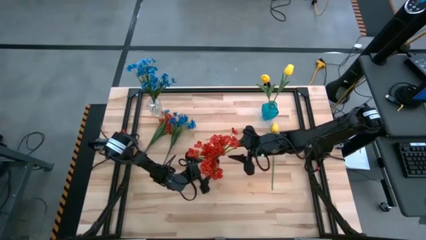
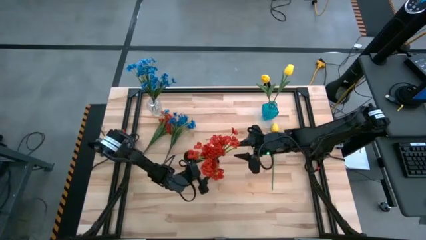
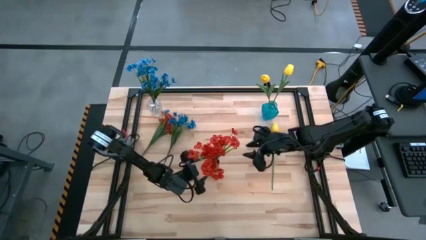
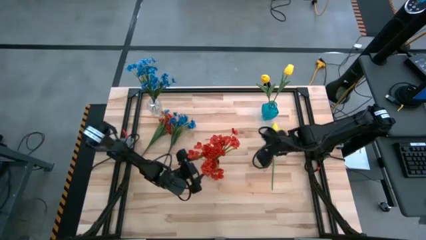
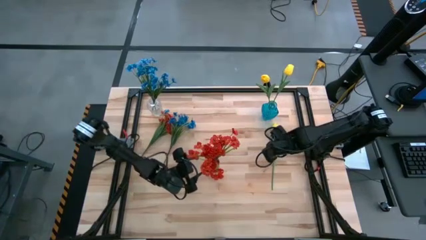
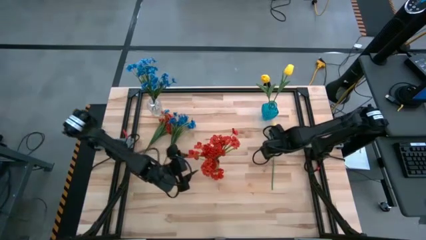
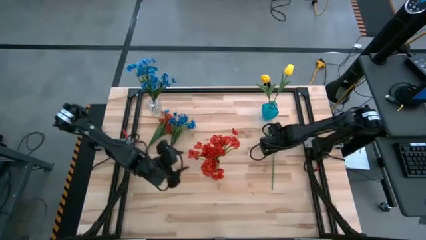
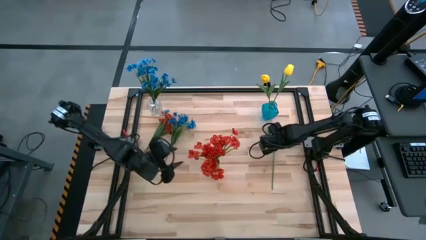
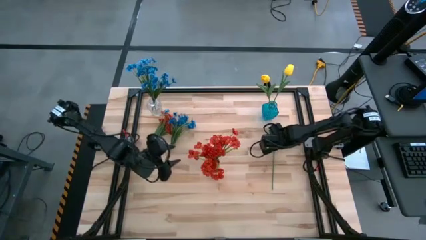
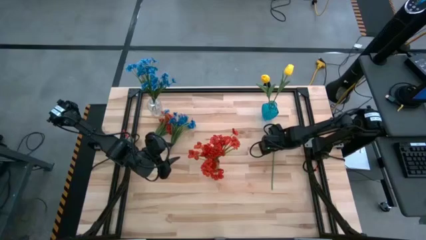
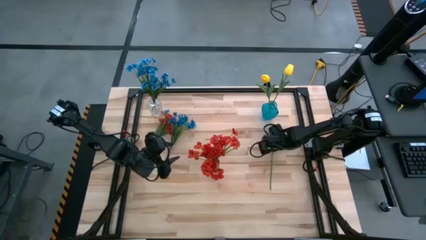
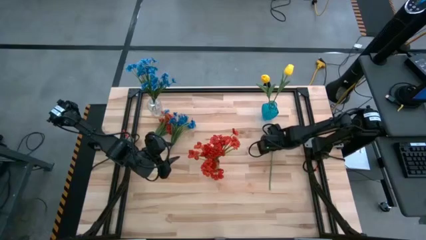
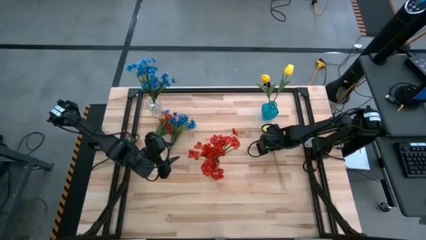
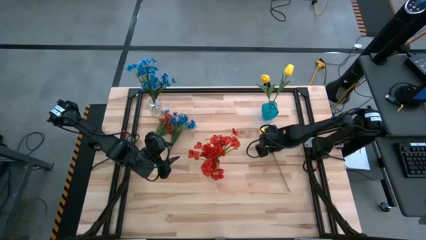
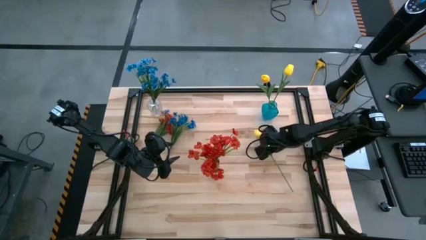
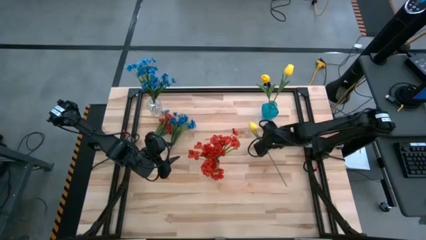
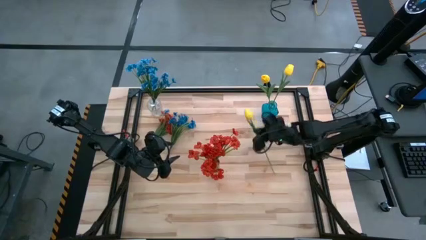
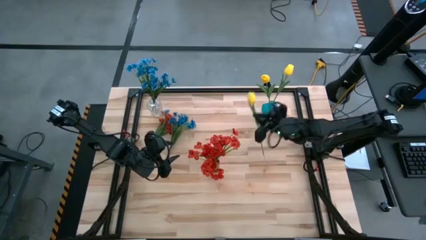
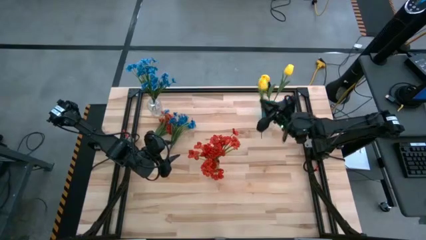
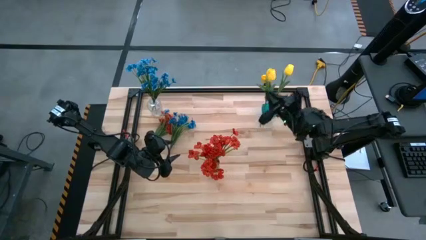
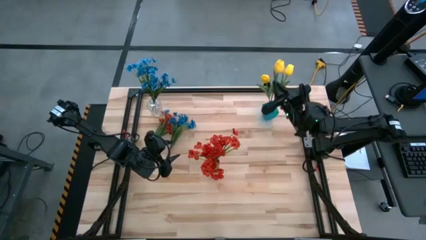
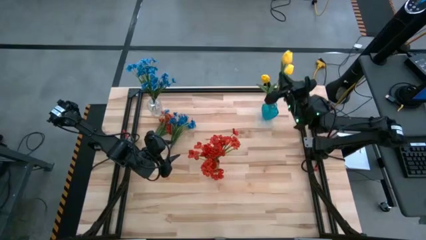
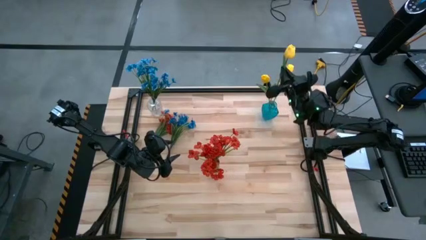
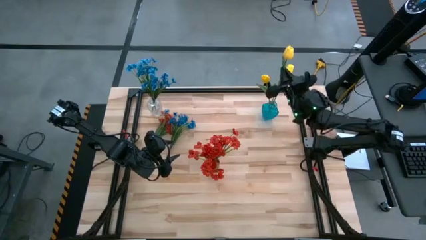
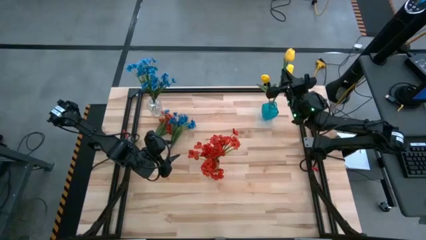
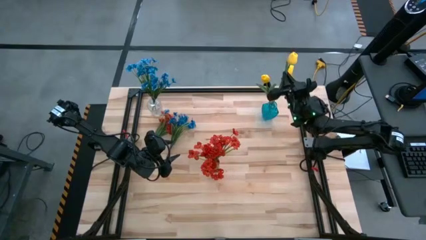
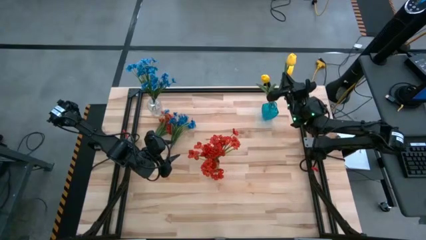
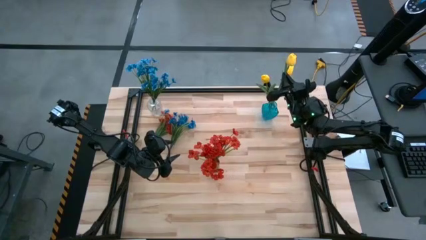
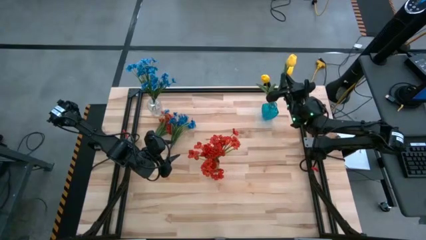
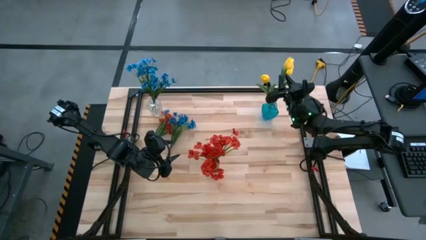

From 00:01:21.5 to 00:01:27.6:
Task: Sort flowers into vase by color
Put the yellow tulip into the blue vase

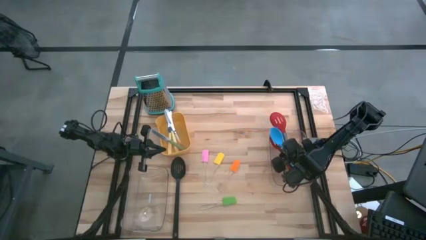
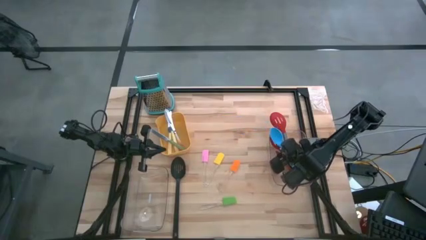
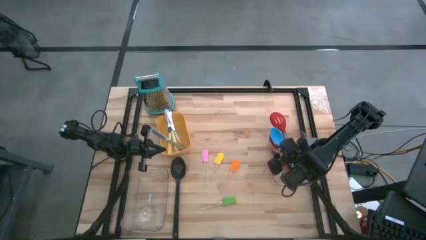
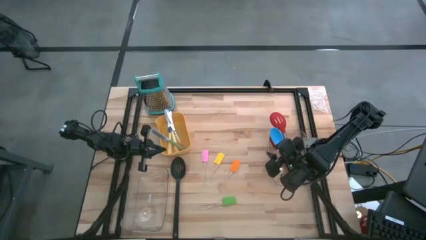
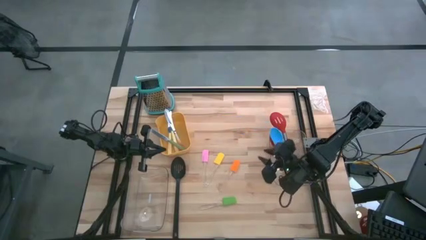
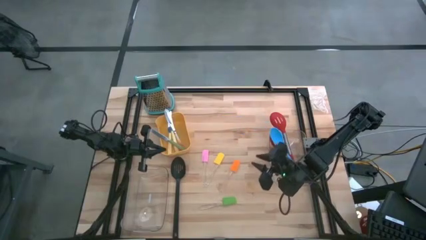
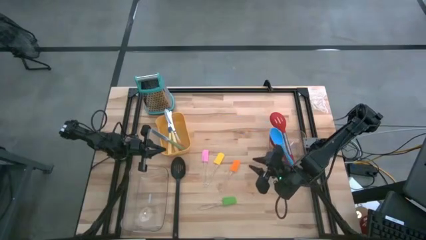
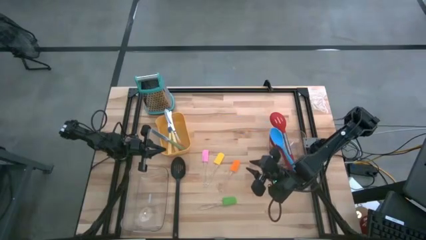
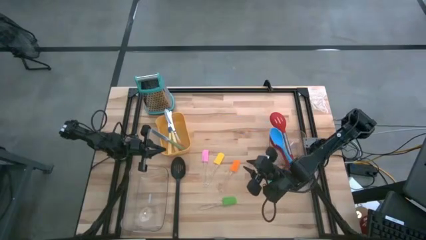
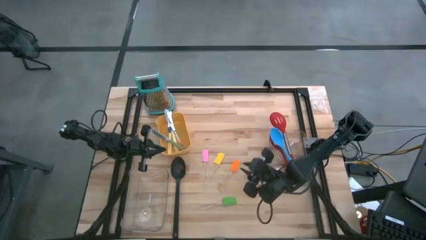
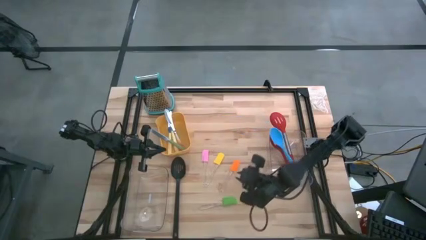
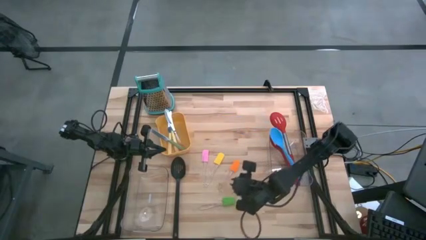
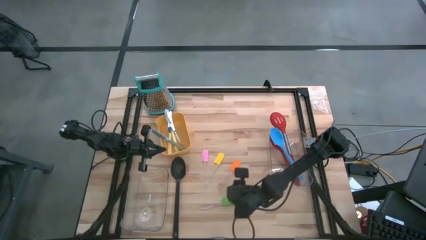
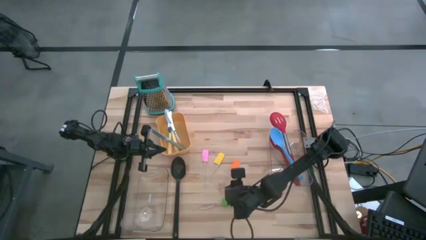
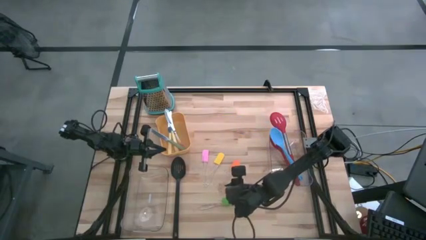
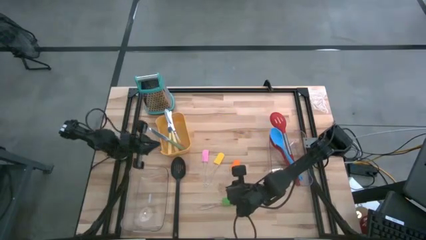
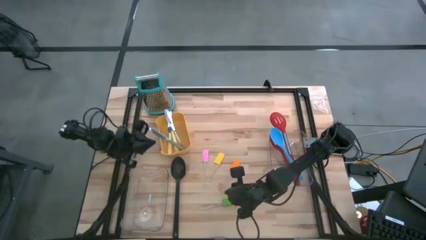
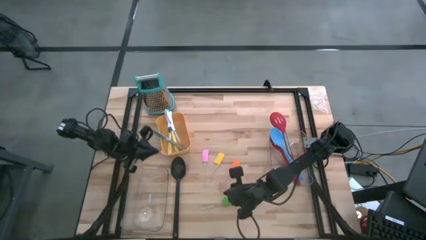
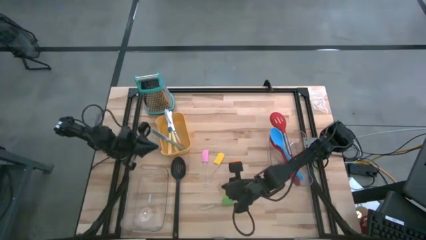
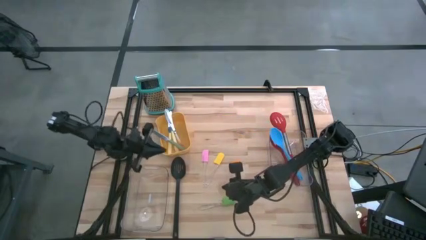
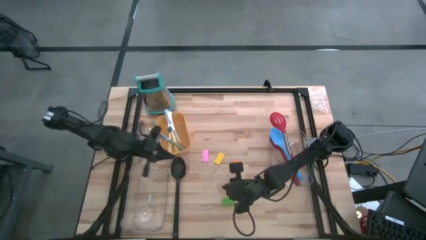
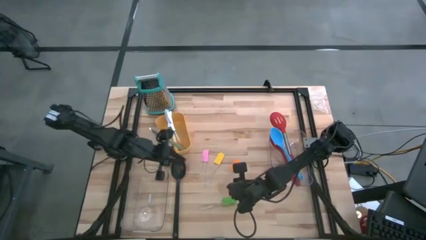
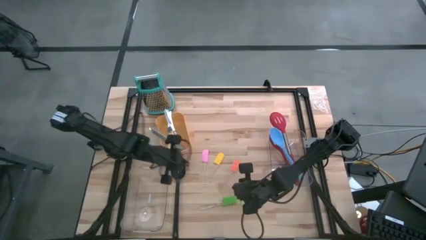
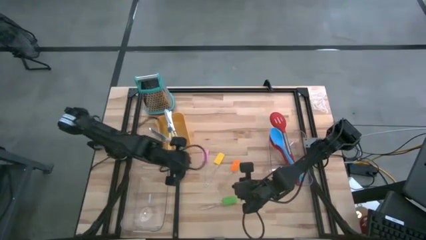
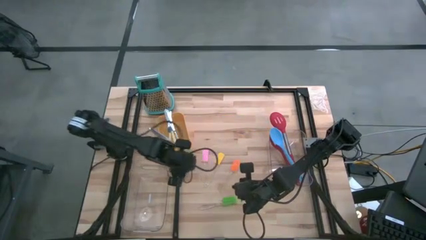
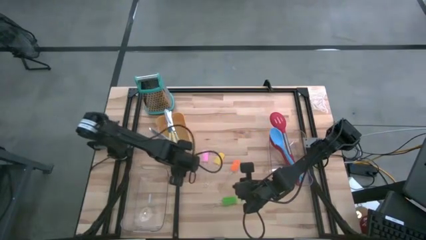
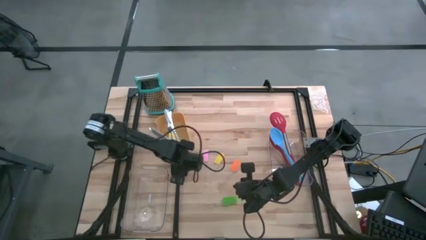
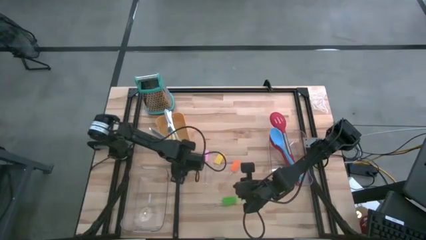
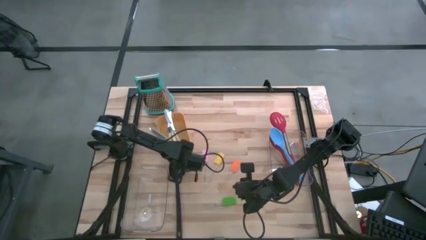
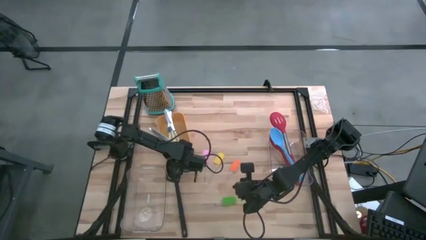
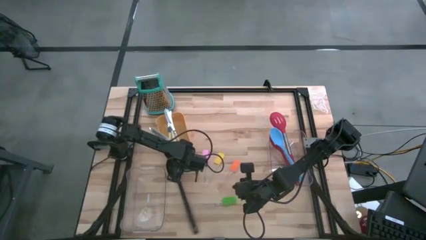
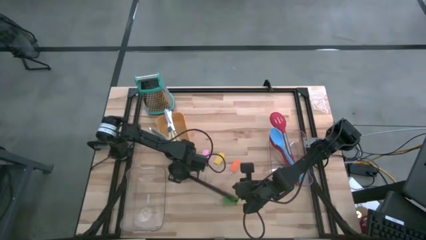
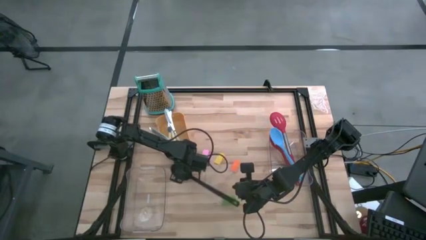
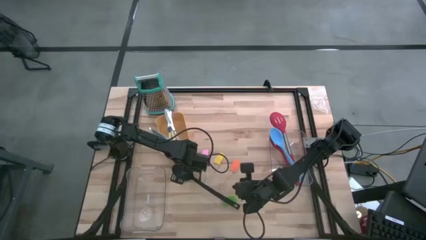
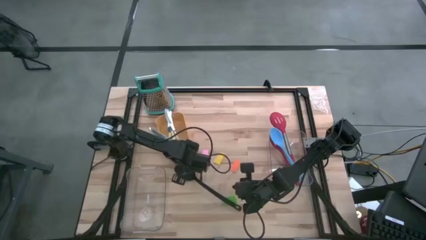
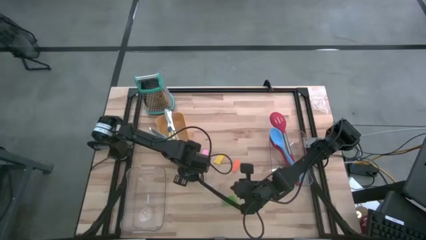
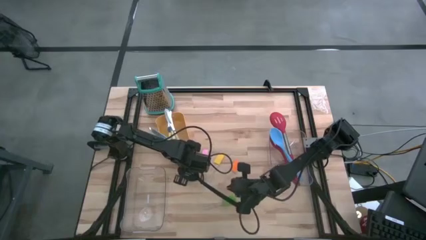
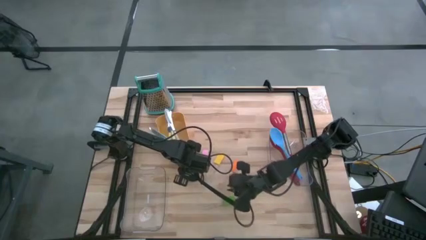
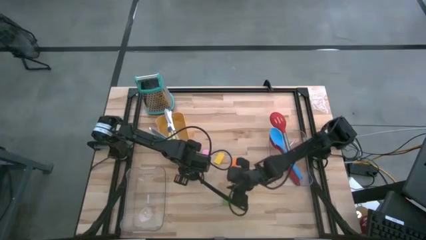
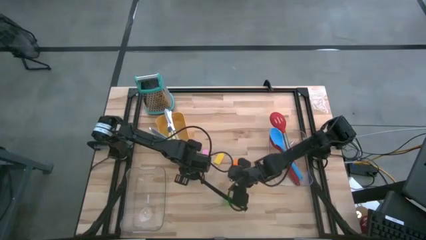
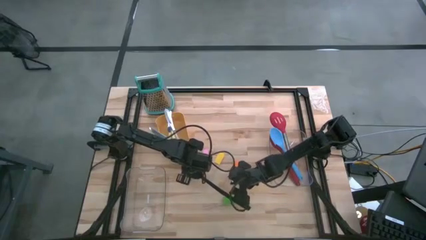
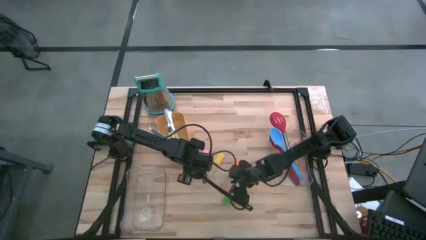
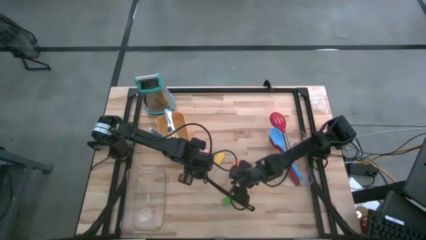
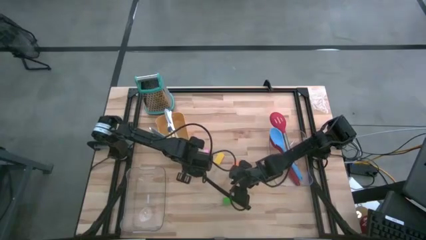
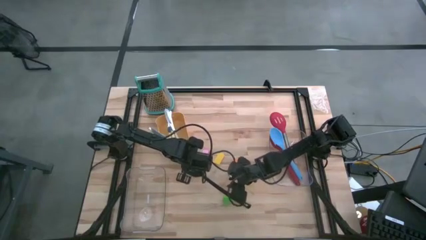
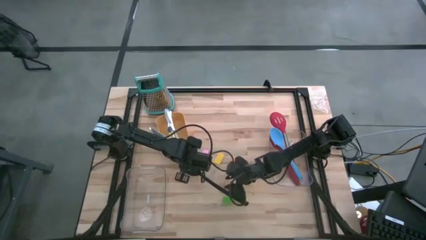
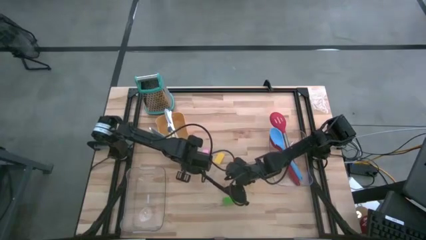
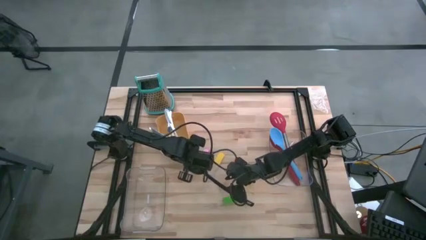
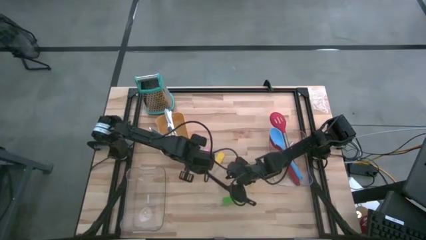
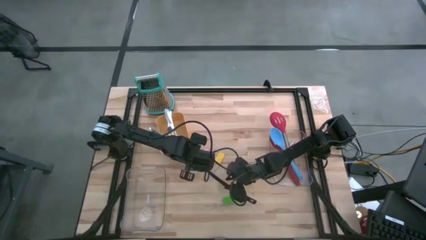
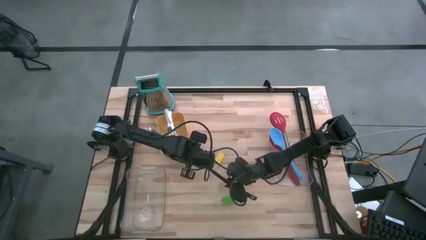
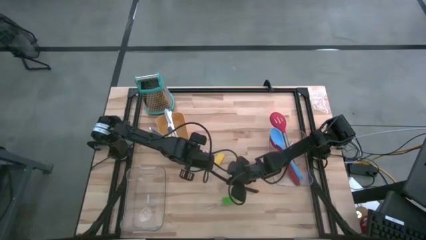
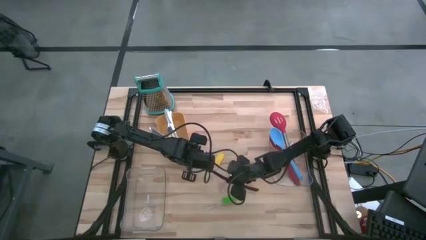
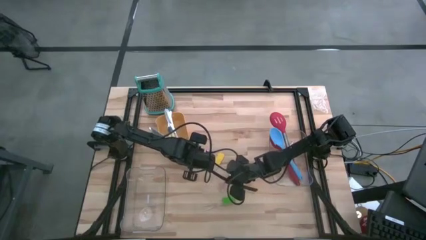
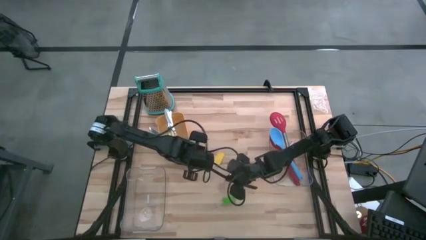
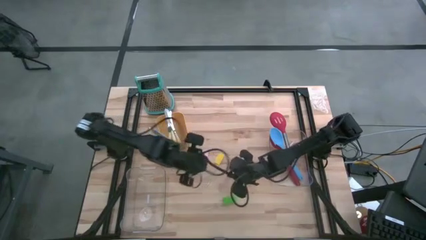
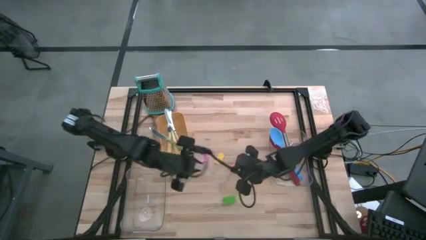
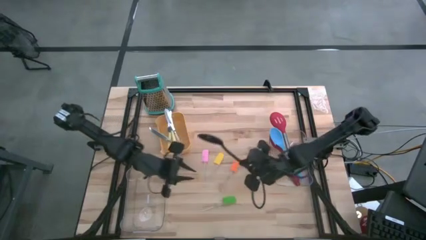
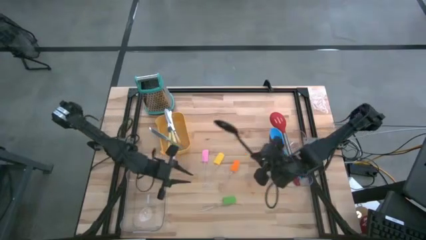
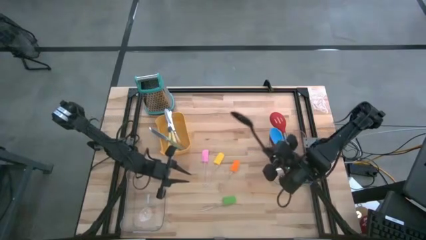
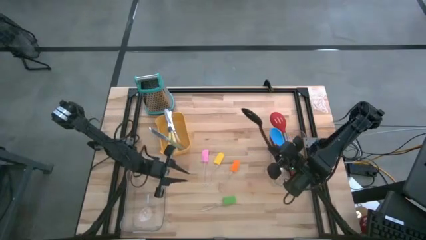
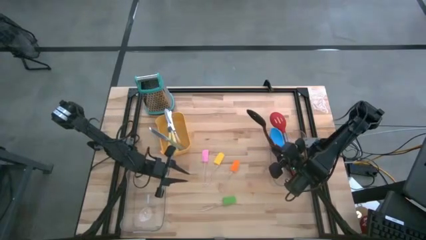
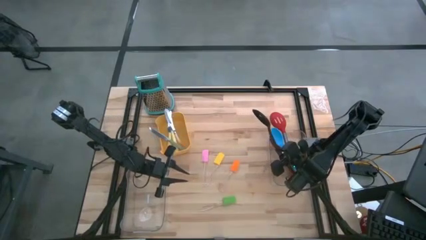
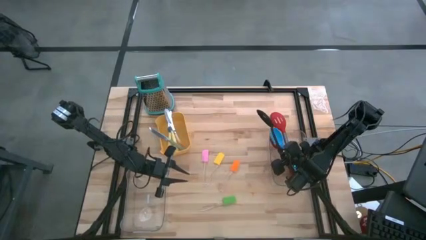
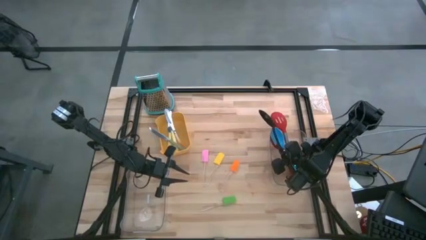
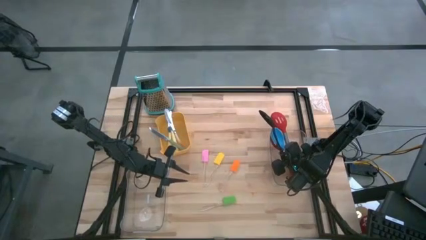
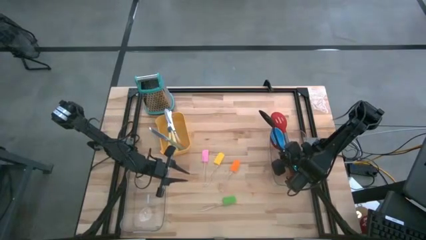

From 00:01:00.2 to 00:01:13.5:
Task: Pick & Place Kitchen Items
Put the black slotted spoon into the right transparent bin
